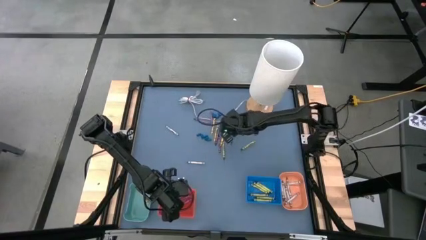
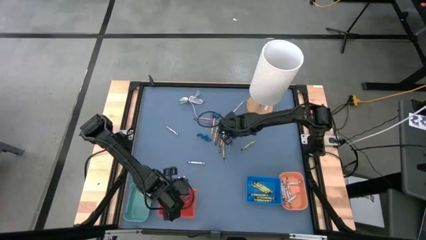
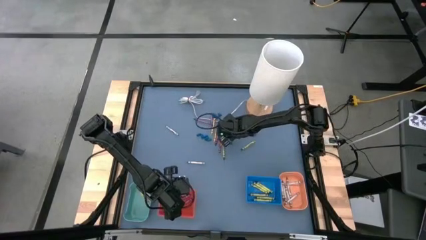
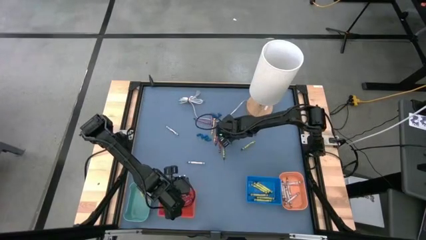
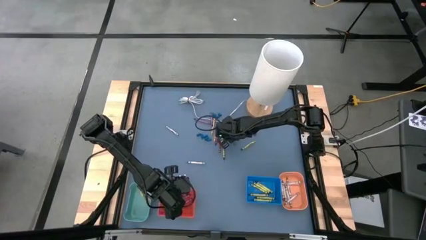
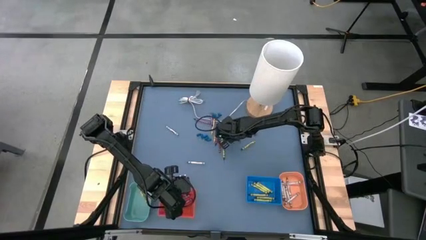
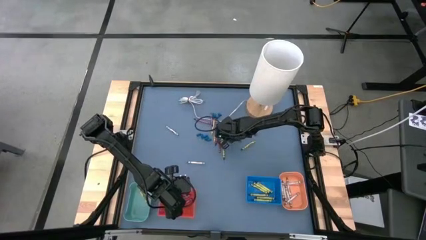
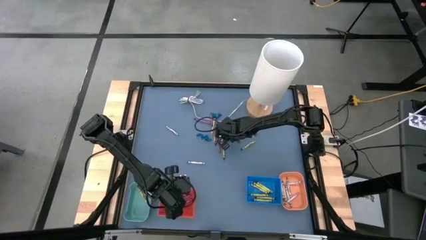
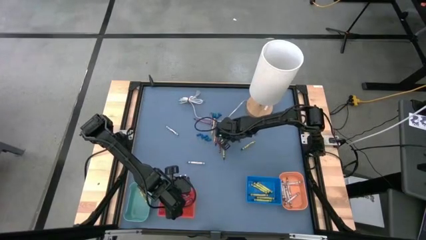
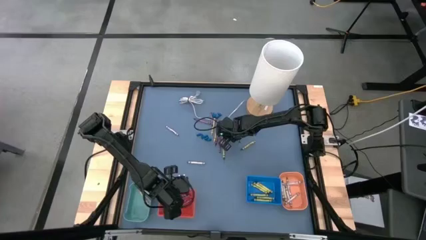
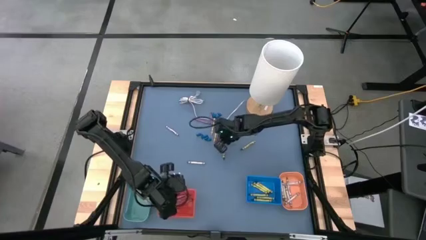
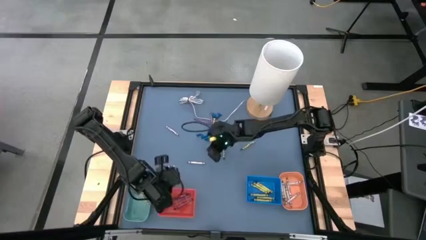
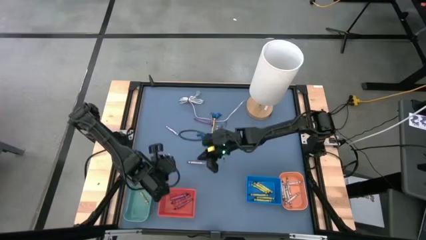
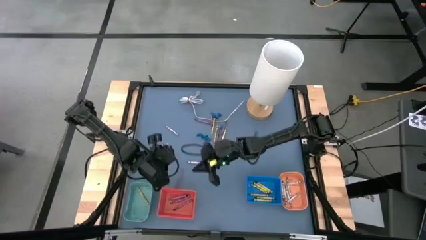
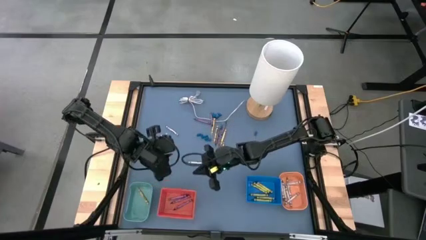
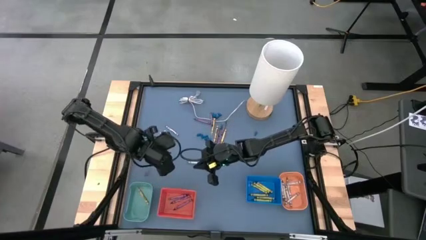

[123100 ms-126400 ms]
Task: Sort crayons
Put the red crayon into the red basket

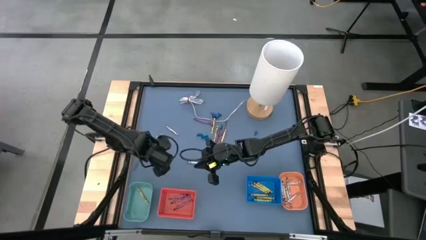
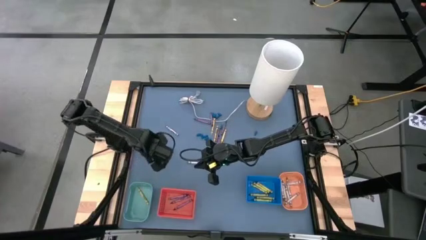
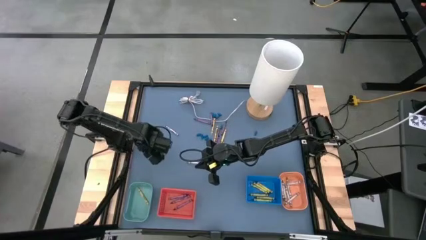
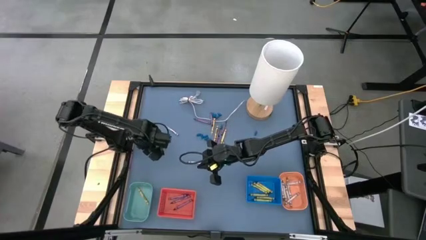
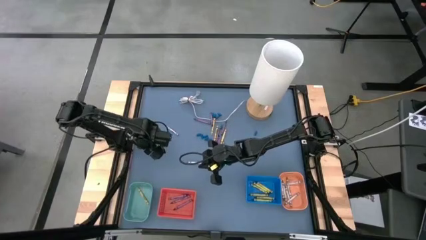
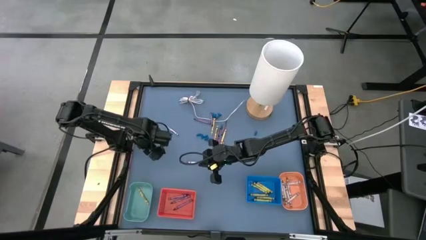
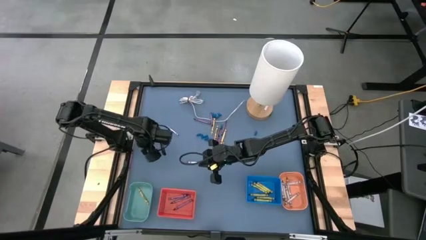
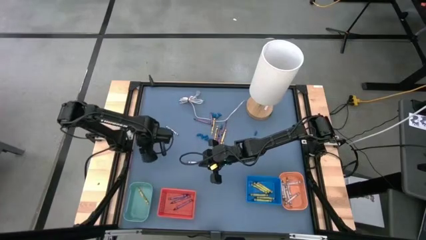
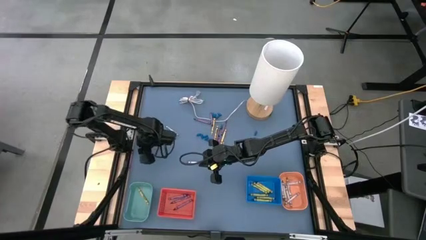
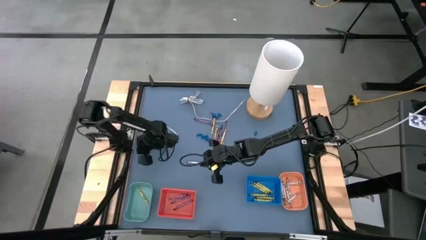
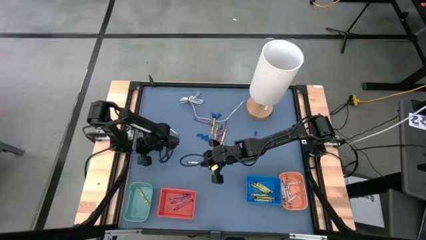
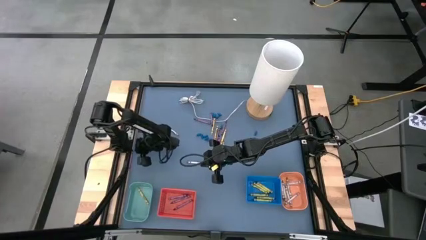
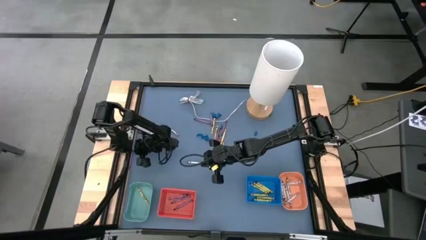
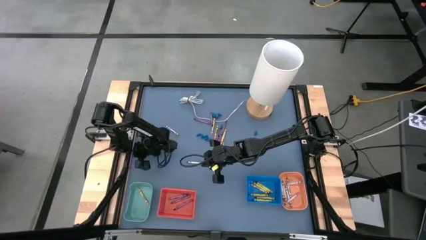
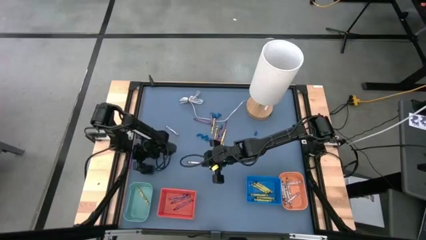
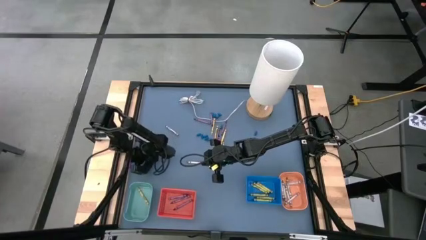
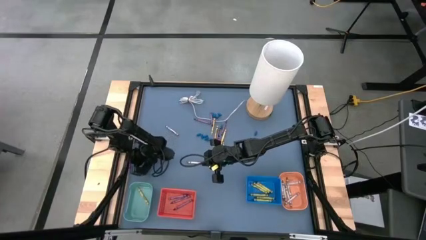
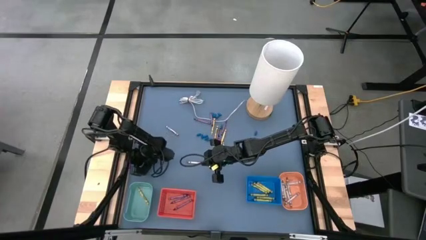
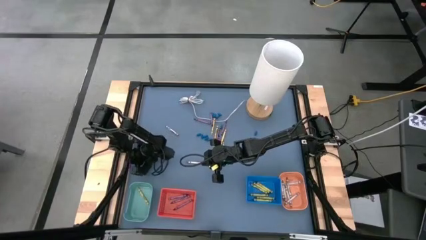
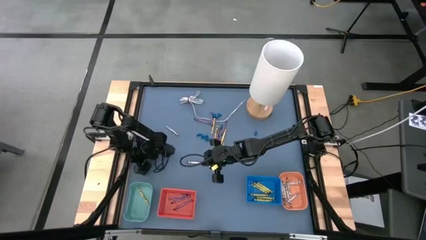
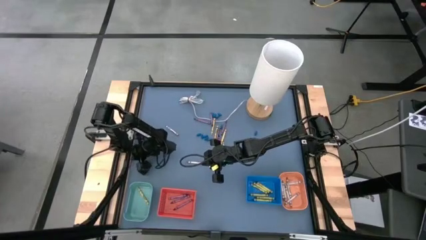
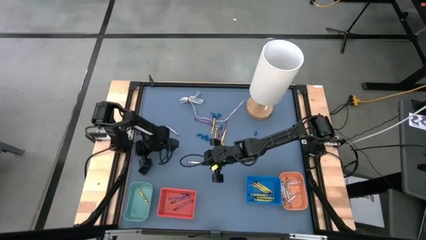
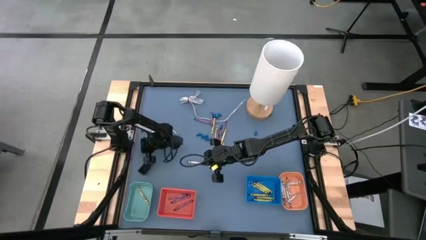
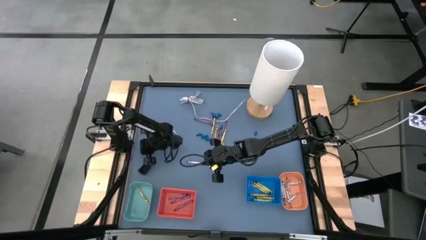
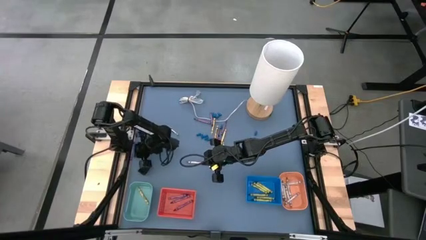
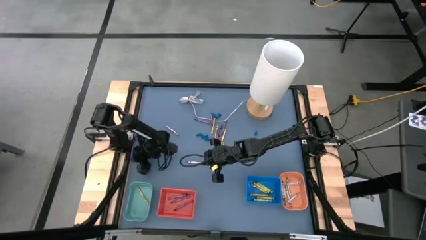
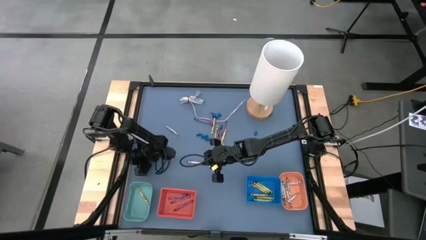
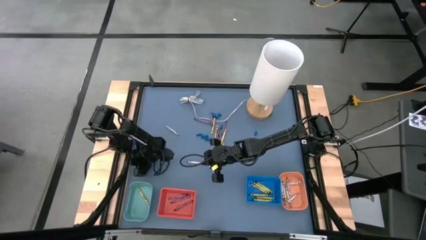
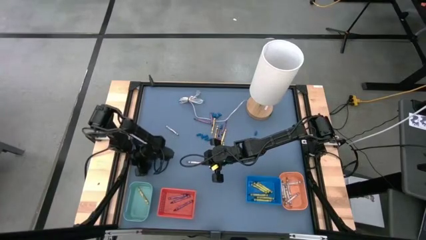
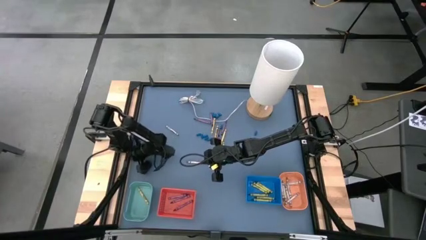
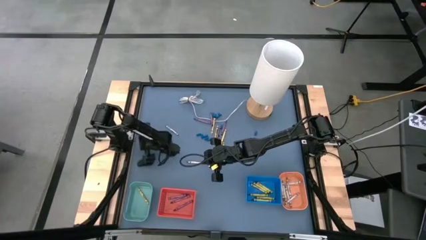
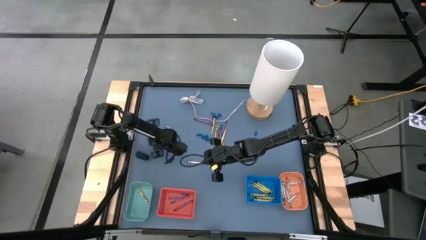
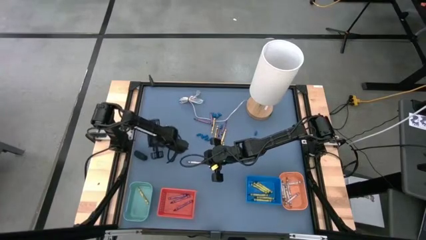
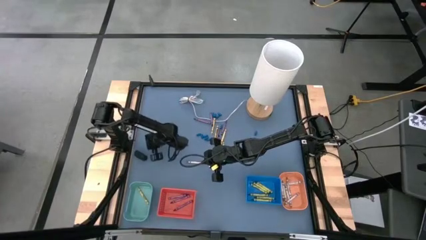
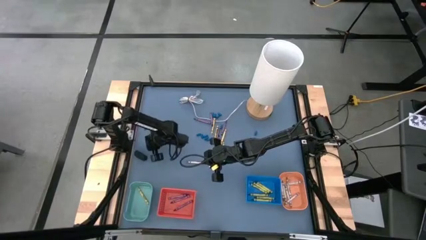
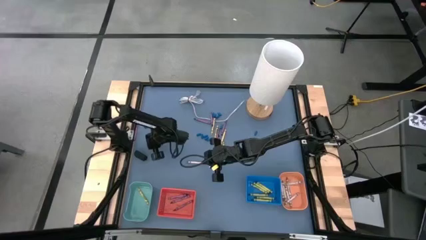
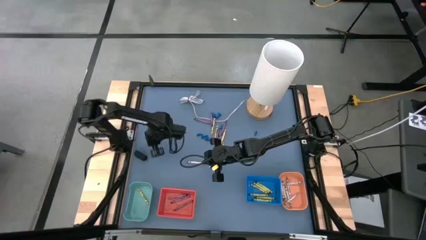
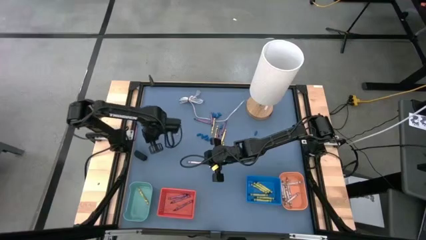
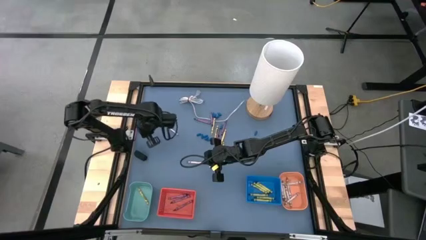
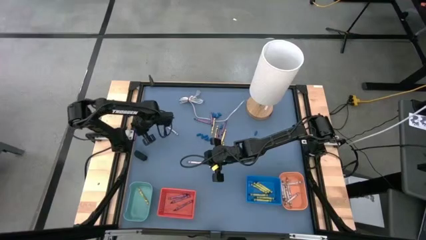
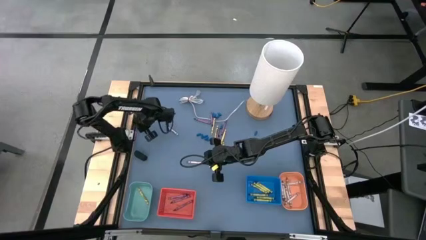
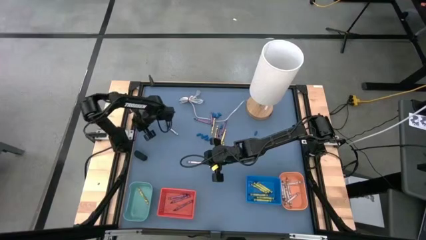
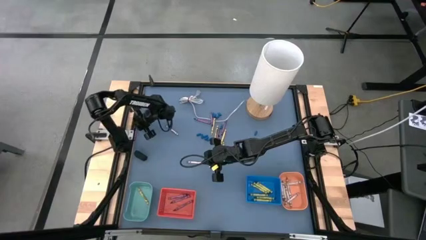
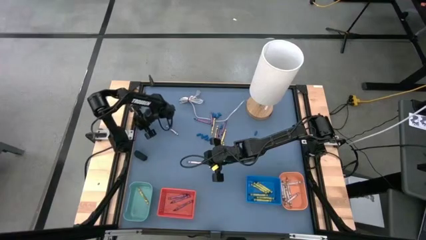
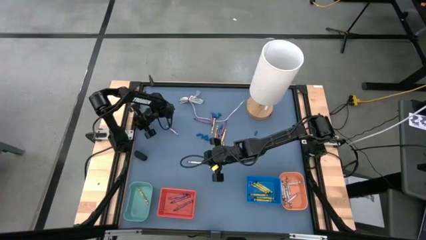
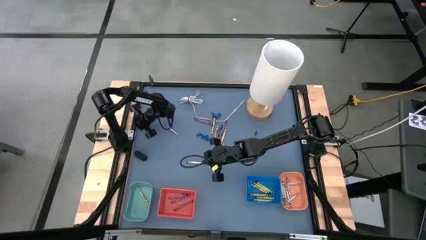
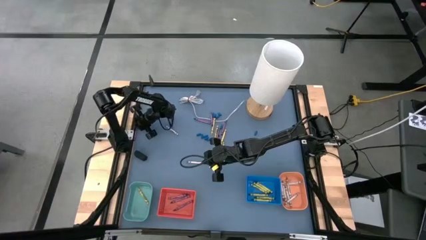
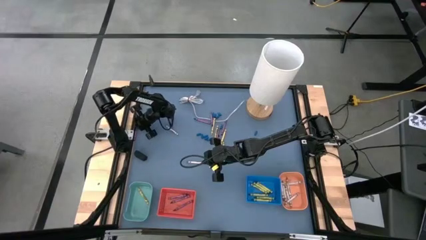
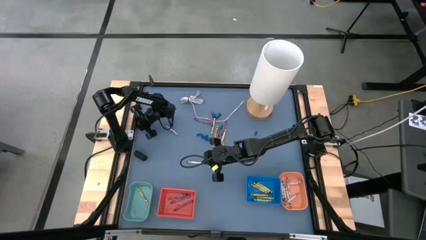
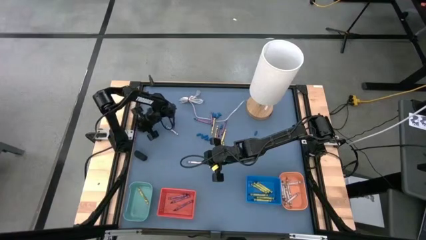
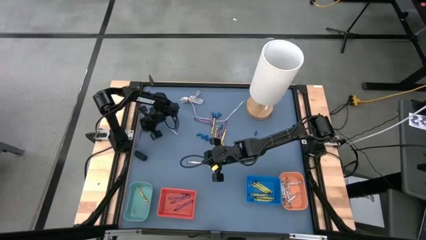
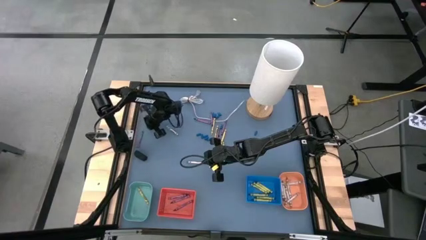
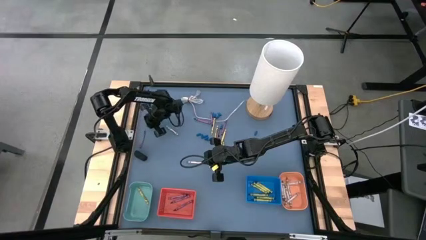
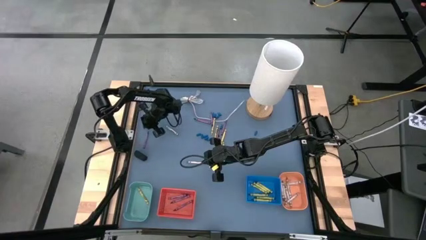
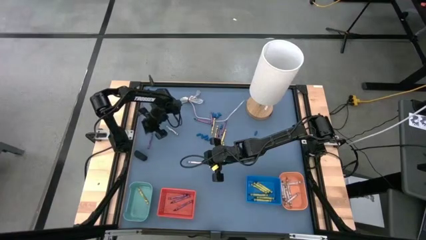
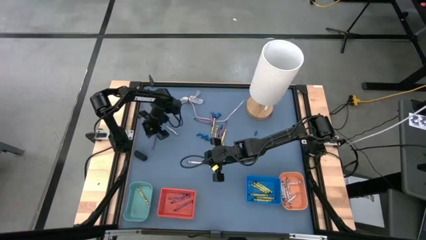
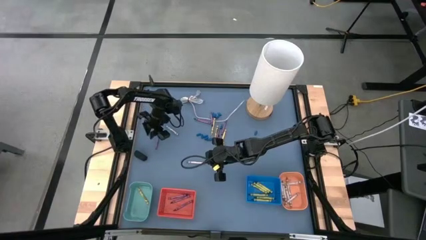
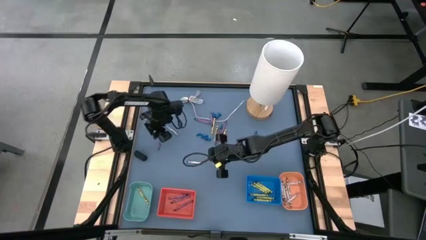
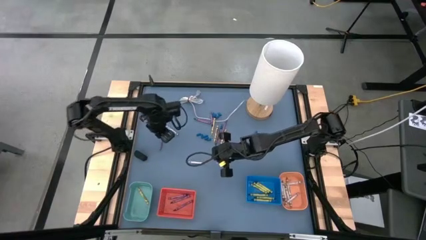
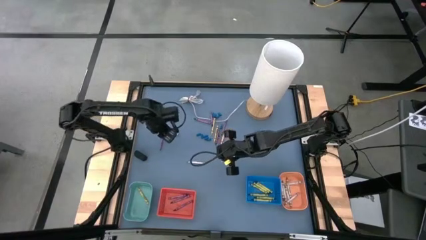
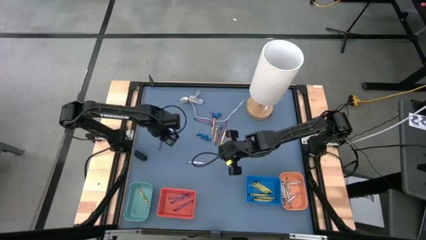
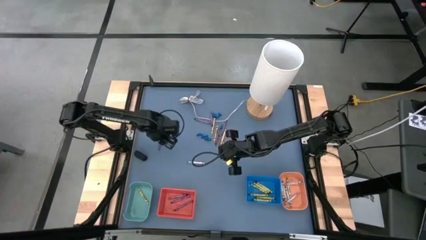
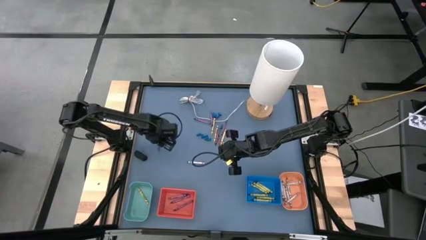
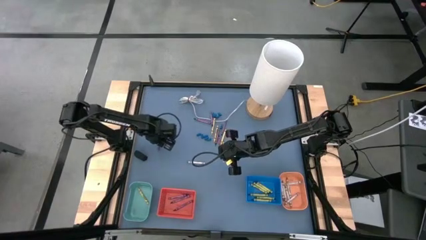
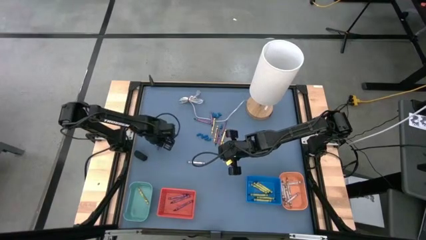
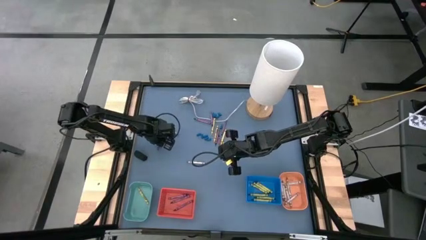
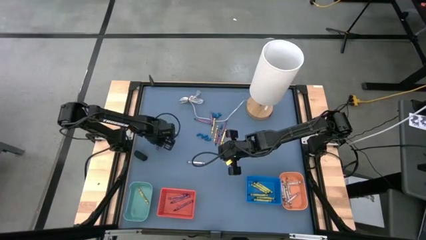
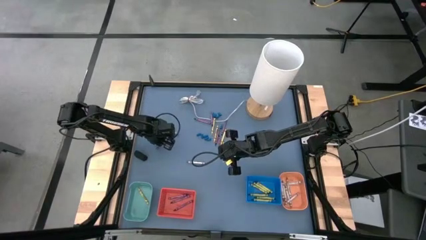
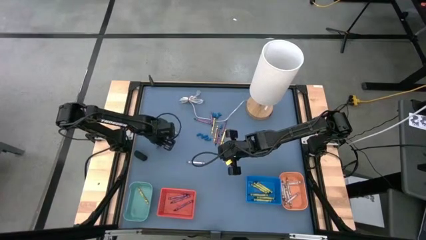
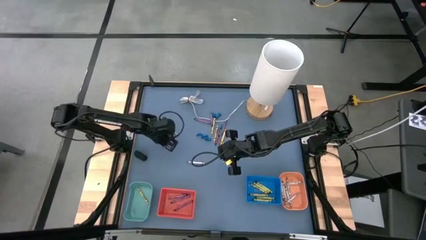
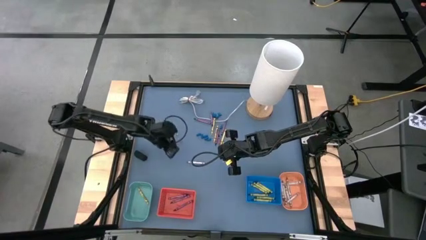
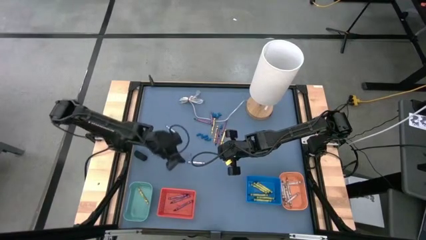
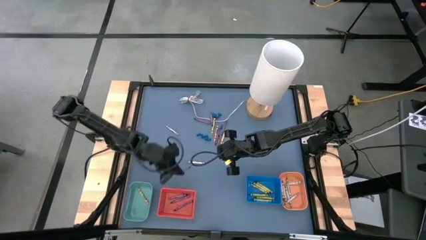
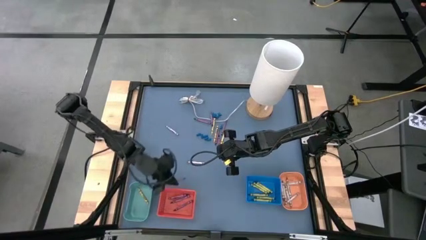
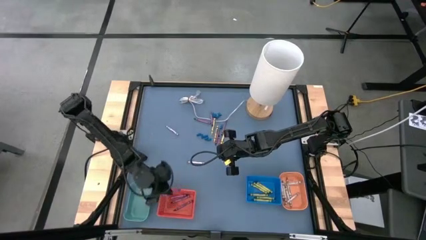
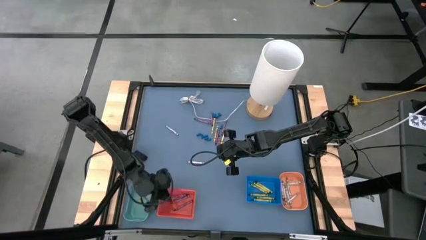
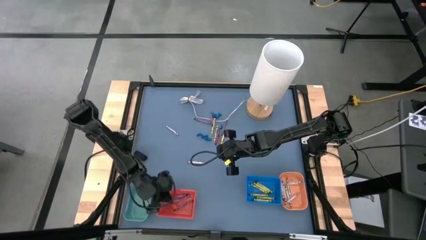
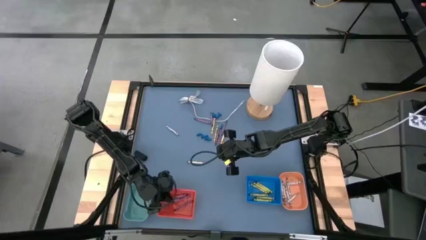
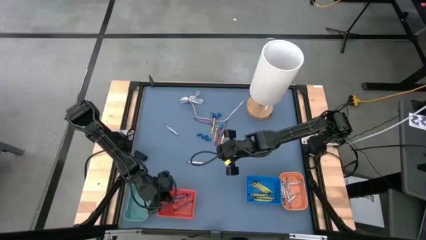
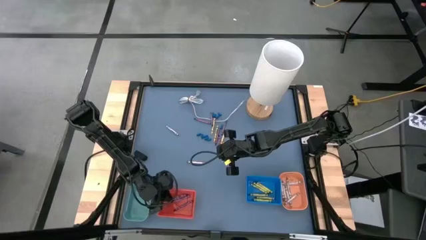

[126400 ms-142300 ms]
Put the red crayon into the red basket
